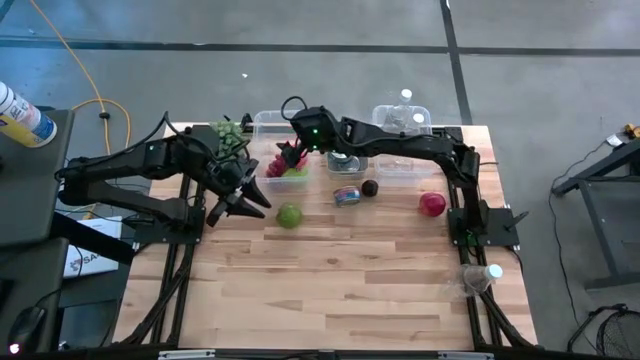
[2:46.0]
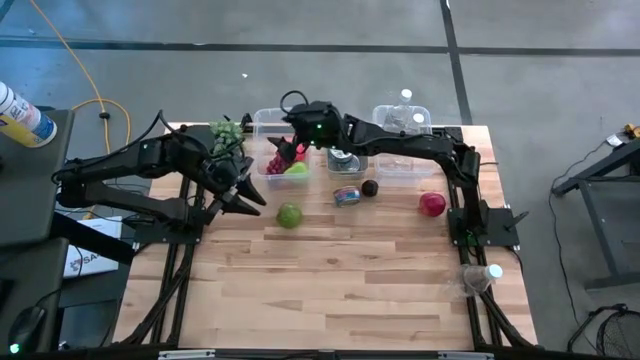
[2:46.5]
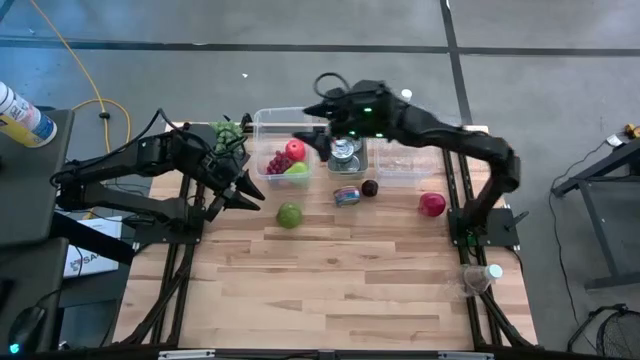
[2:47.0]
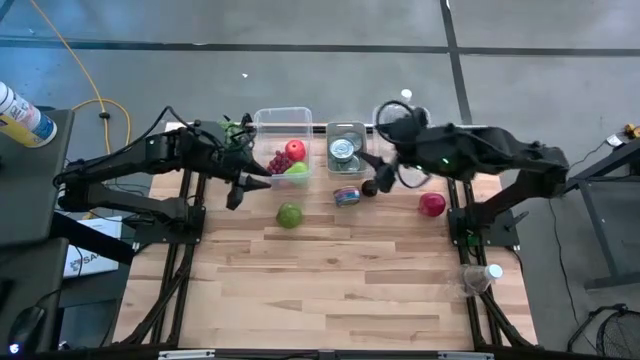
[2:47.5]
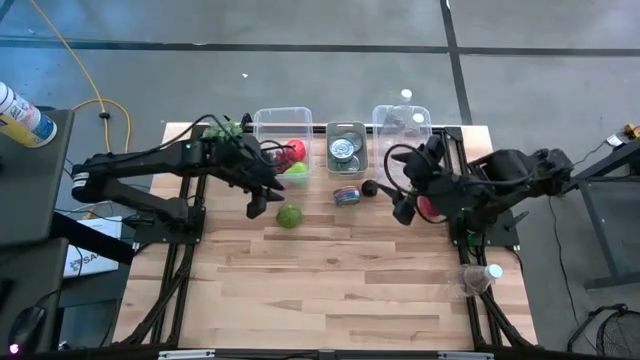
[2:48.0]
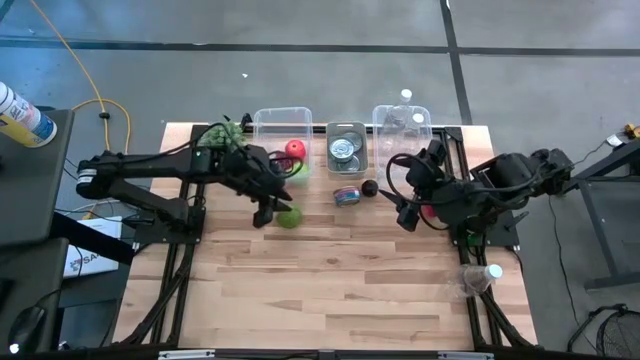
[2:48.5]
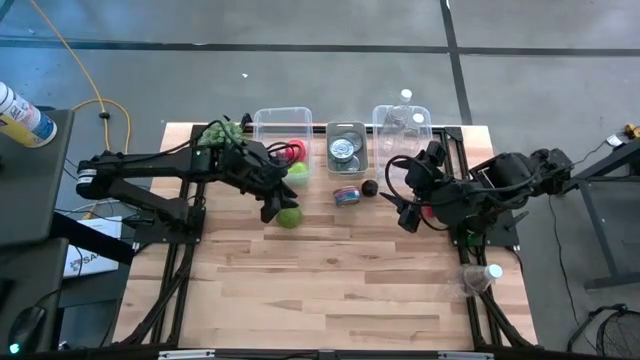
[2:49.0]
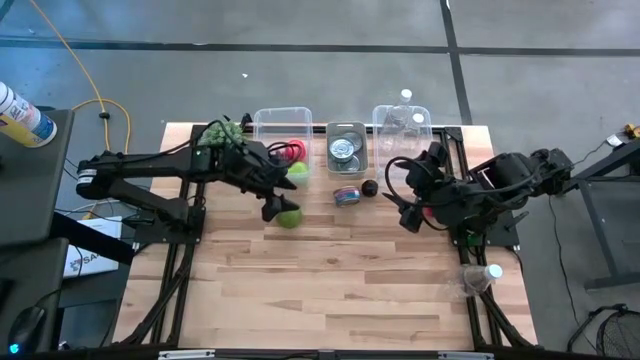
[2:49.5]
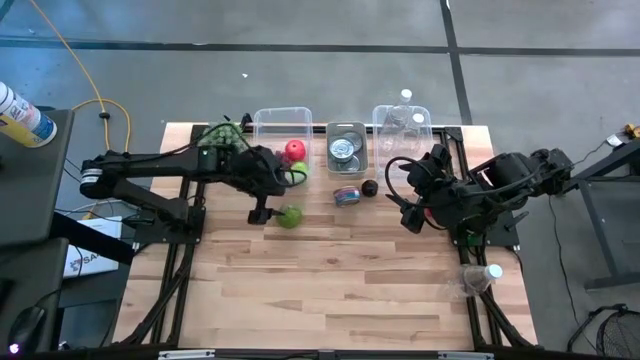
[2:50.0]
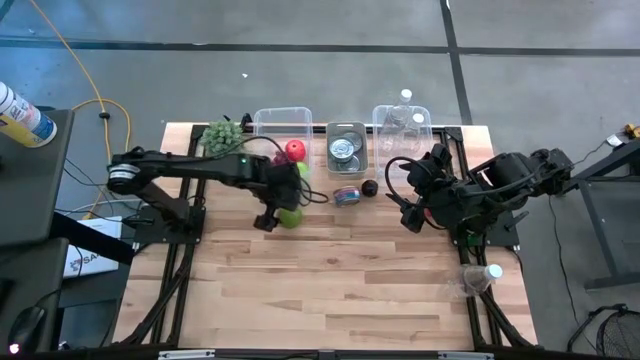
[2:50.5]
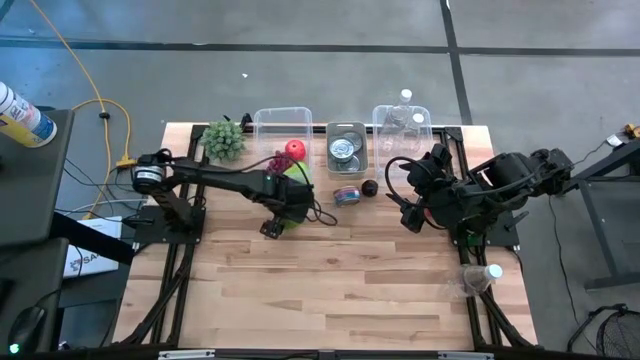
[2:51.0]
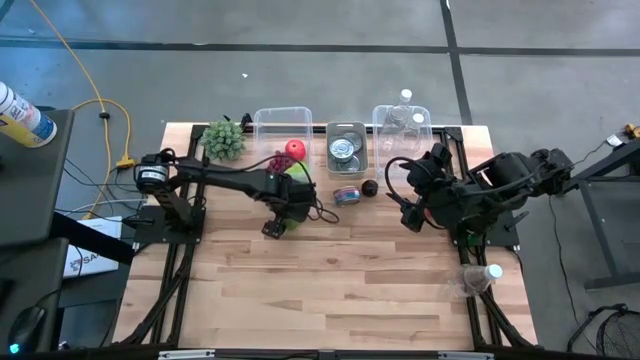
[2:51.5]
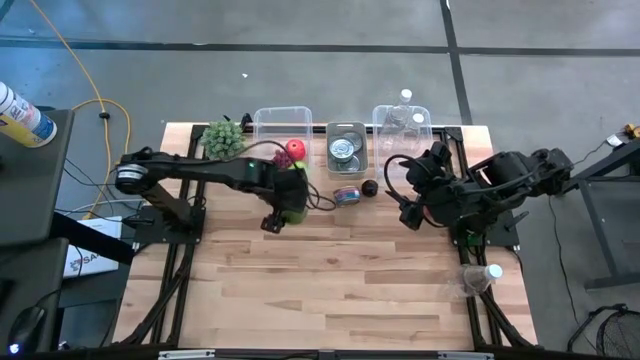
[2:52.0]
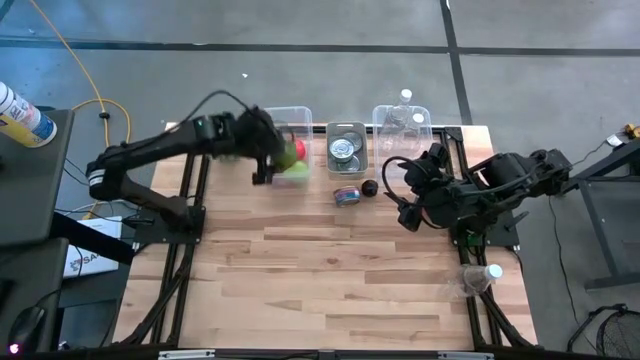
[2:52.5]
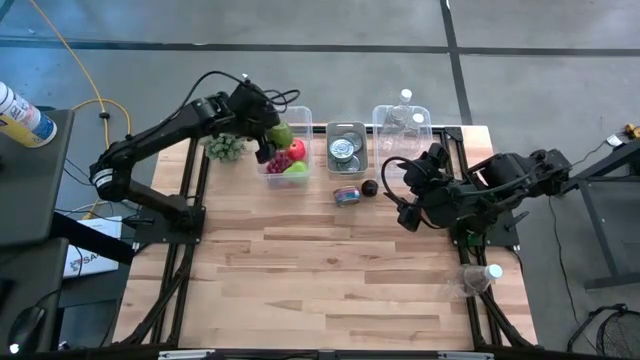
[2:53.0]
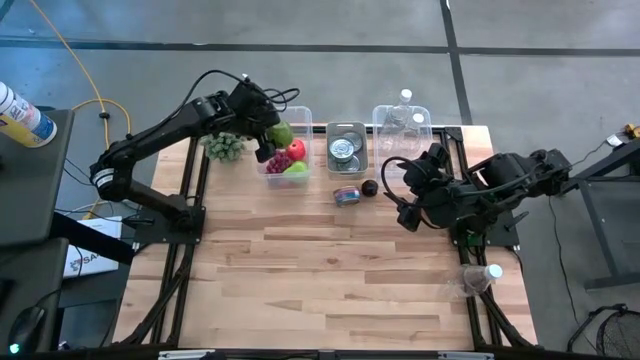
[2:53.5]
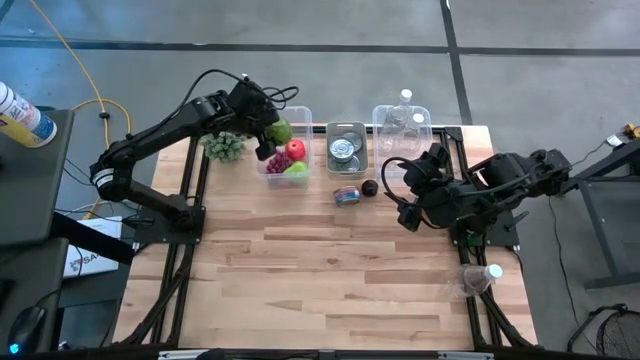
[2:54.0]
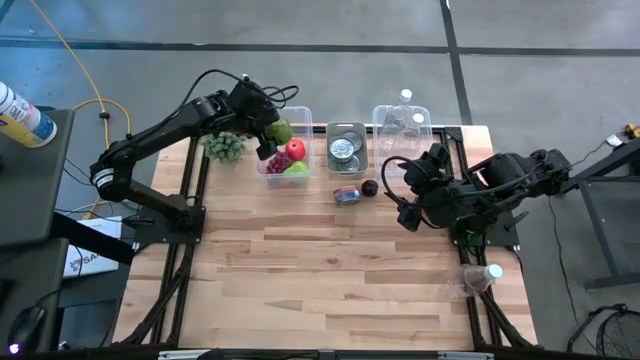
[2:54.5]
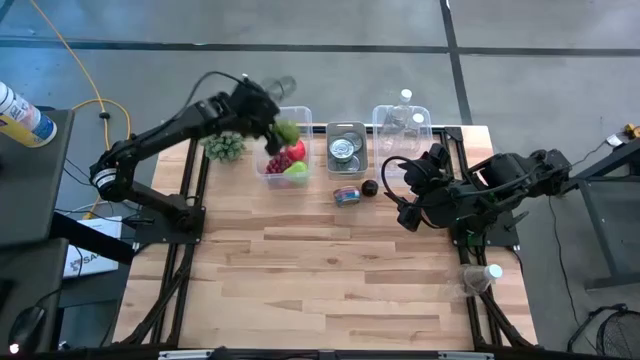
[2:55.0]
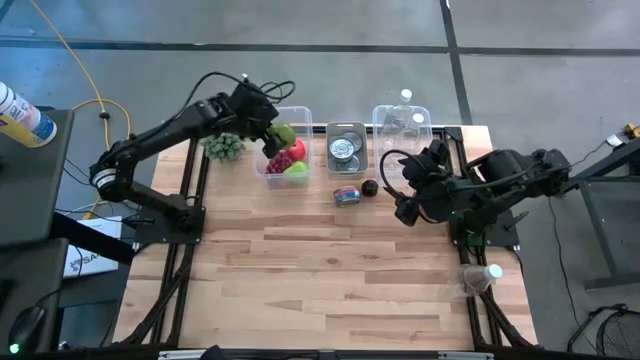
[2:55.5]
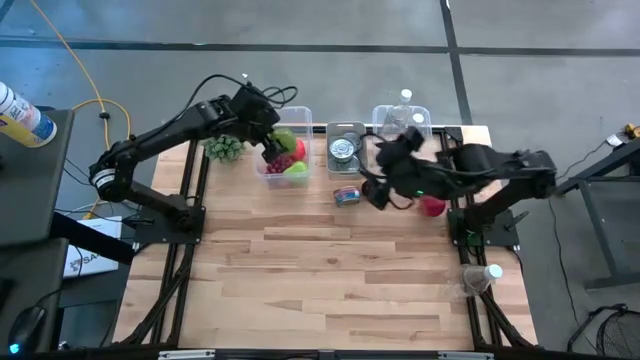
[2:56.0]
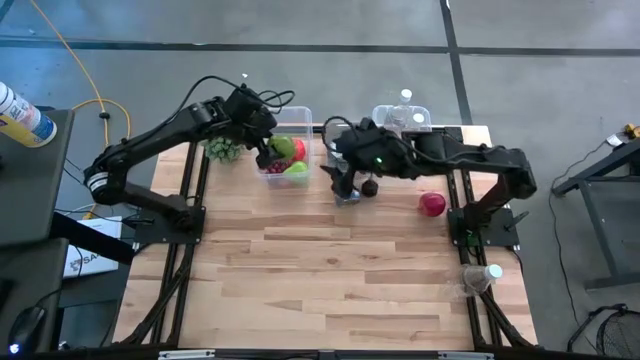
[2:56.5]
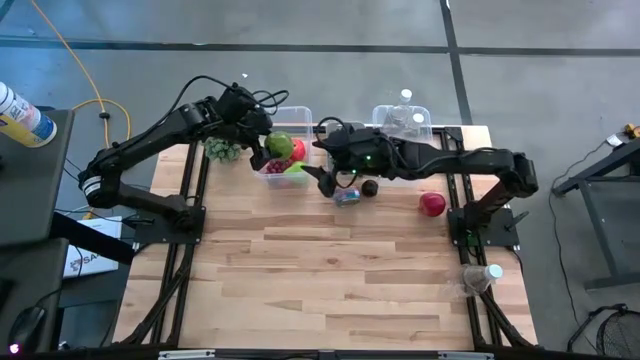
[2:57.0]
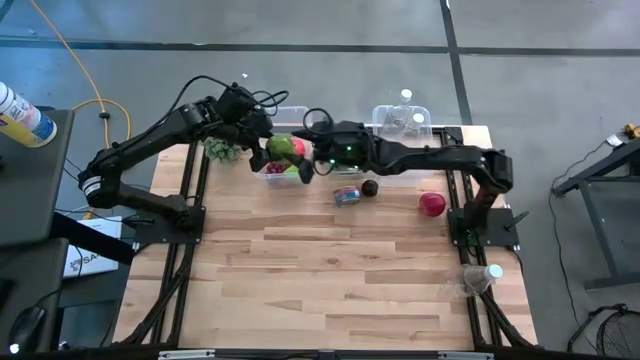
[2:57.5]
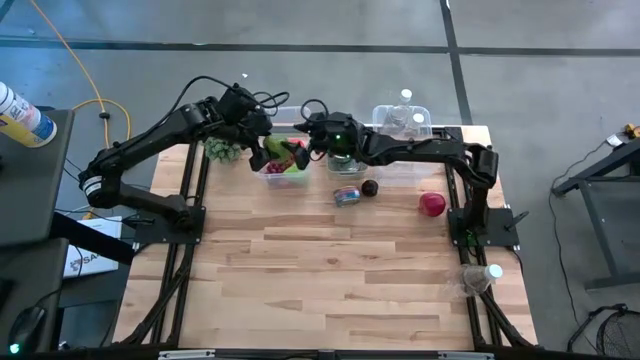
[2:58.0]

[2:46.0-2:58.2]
Task: Pick & Place Food Item
Put the green apple into the left transparent bin

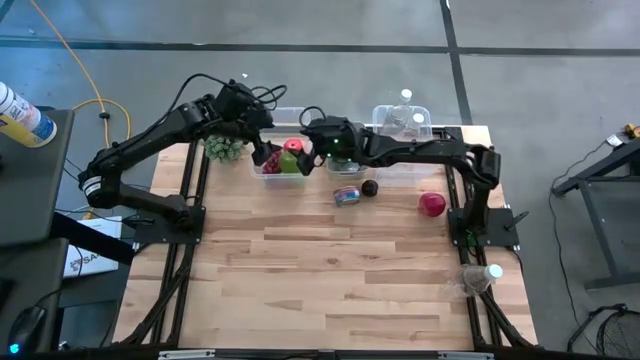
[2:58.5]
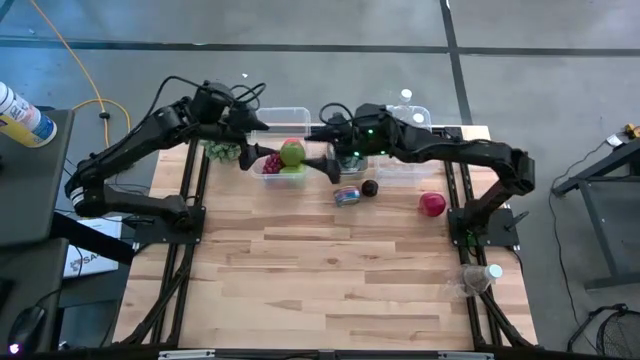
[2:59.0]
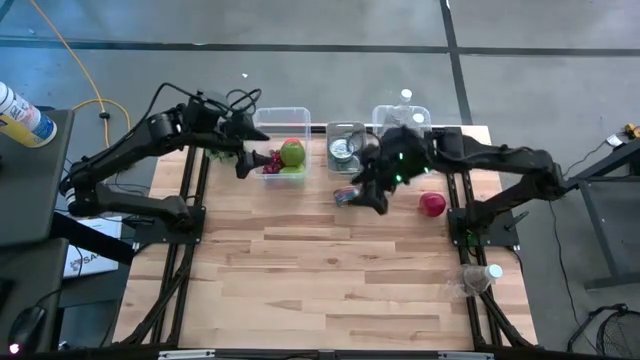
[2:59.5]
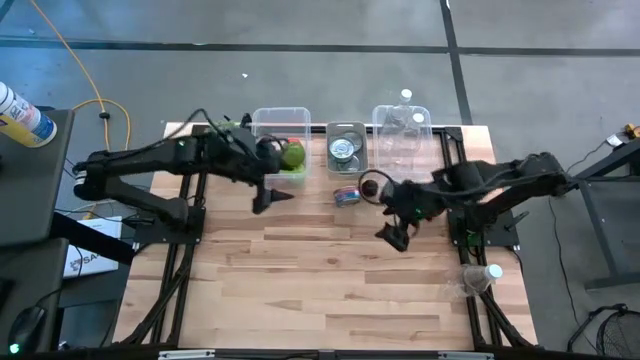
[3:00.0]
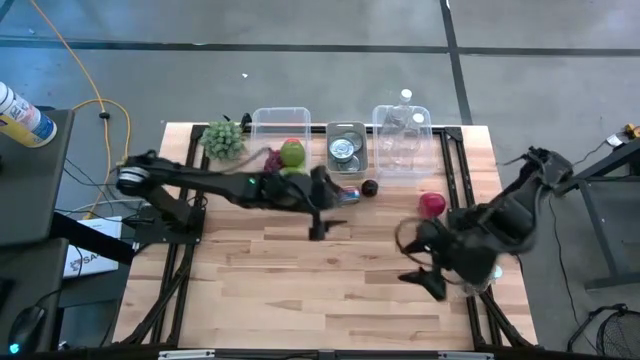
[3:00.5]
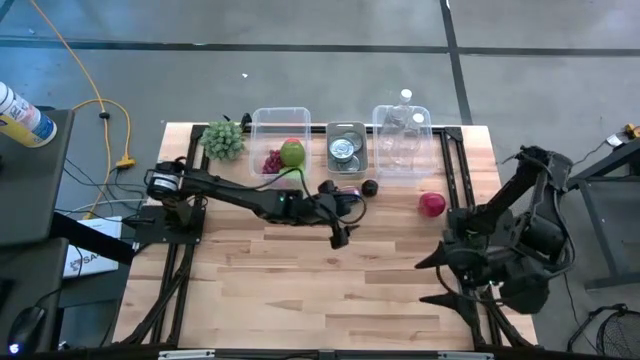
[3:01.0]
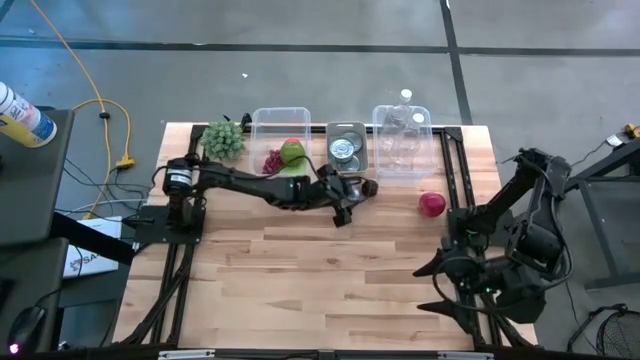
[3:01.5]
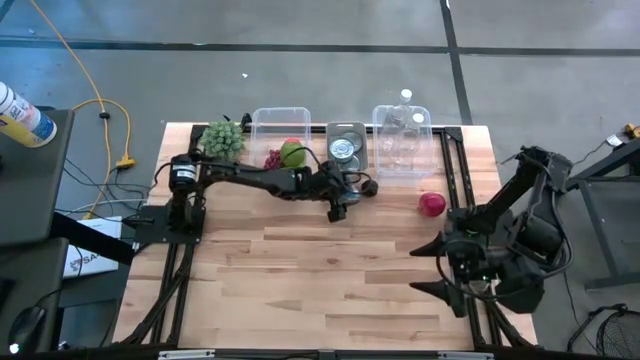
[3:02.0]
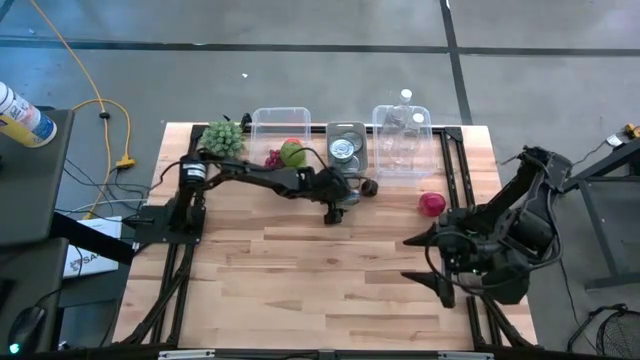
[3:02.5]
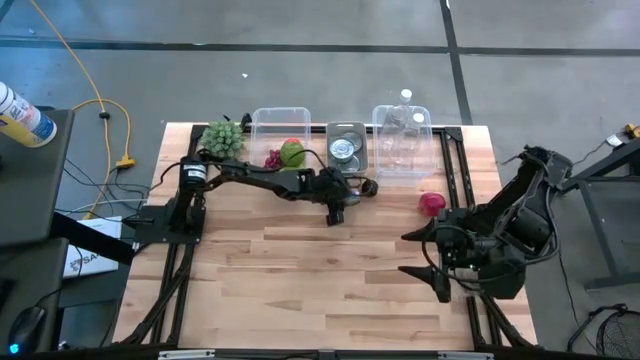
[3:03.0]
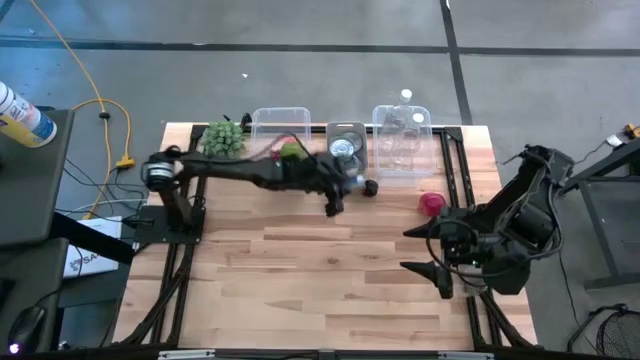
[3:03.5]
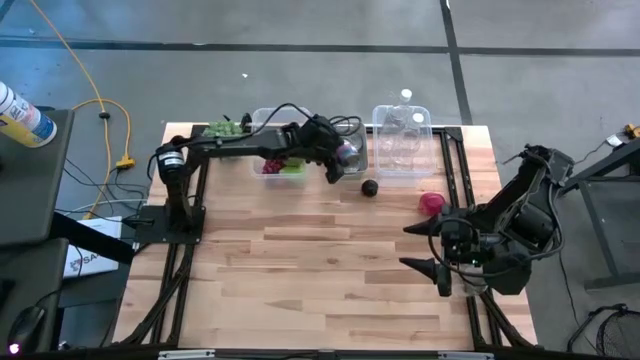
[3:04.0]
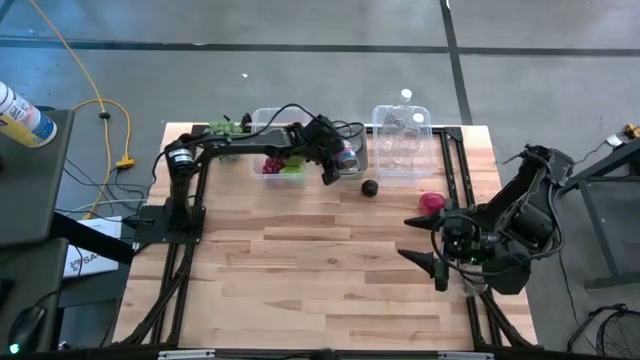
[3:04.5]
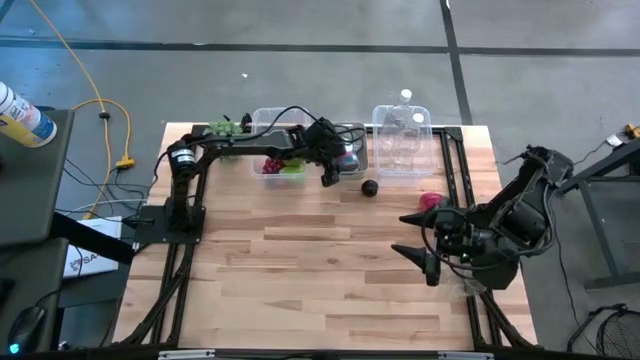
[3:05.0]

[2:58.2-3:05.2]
Put the blue and pink tuna can into the gray bin
